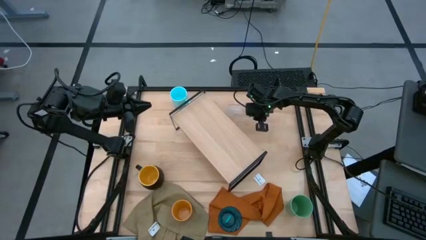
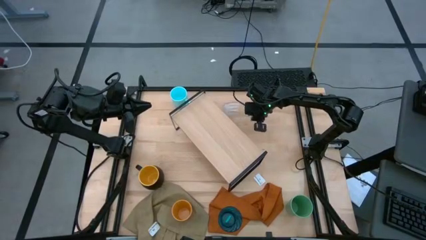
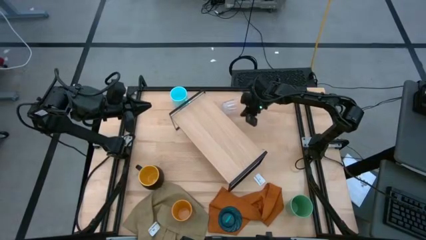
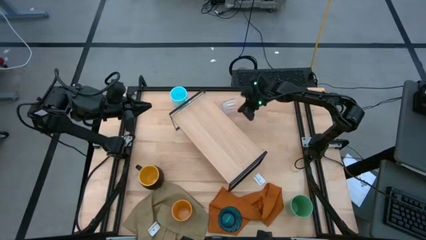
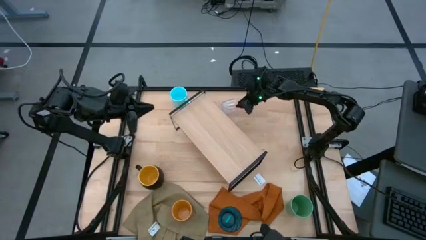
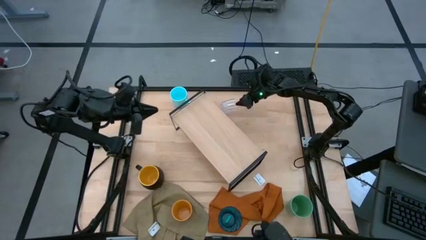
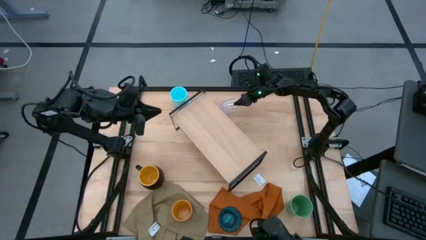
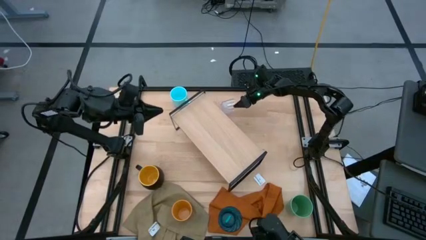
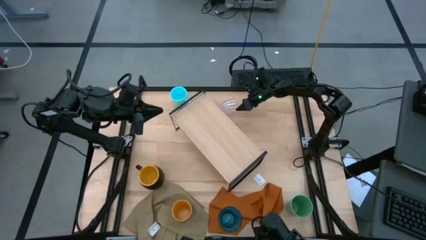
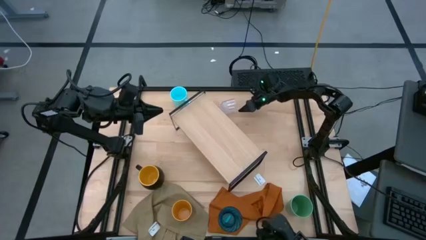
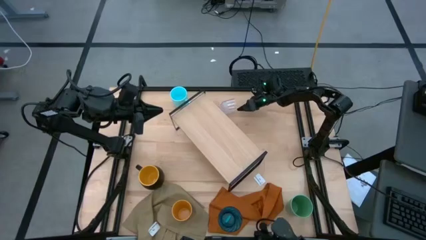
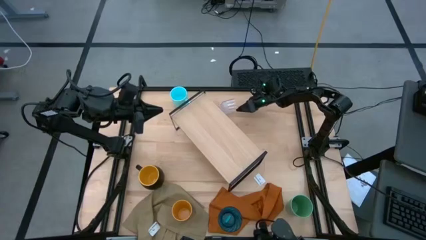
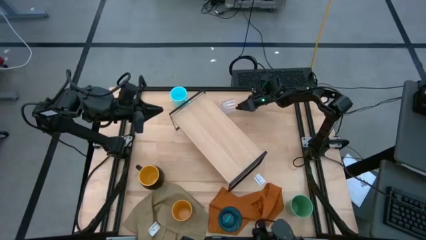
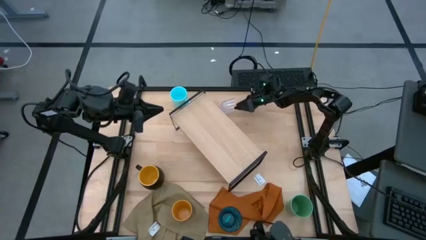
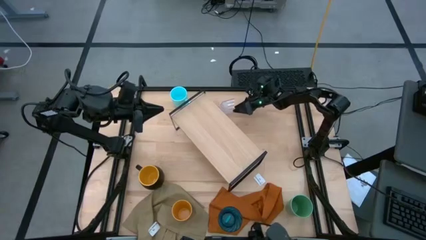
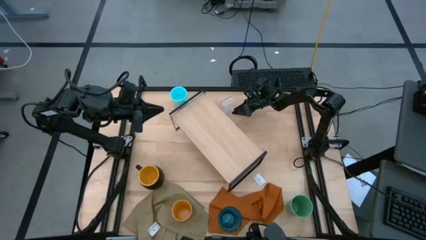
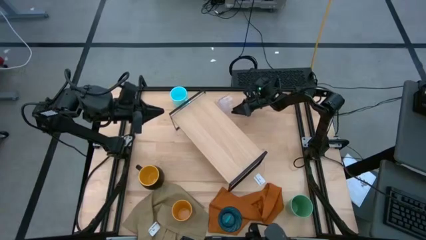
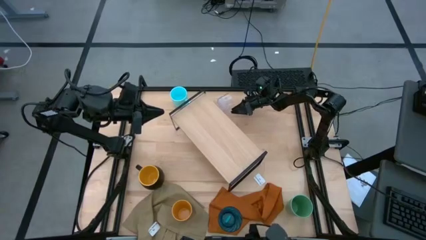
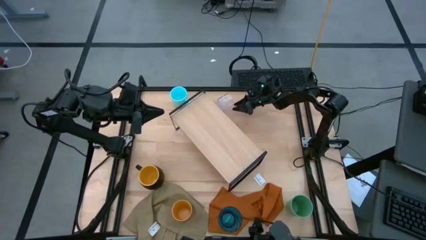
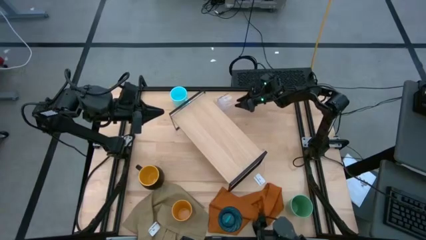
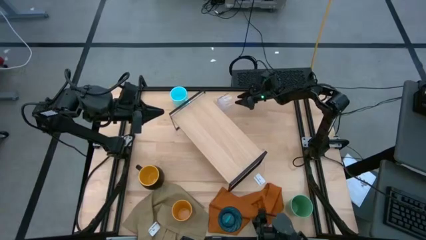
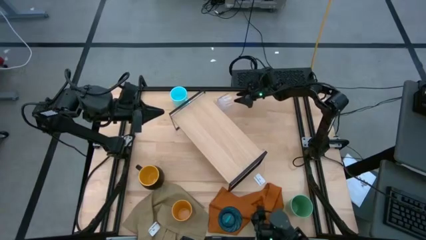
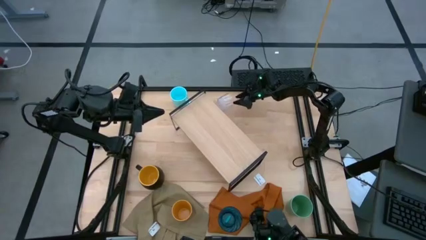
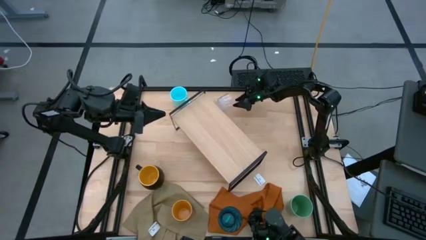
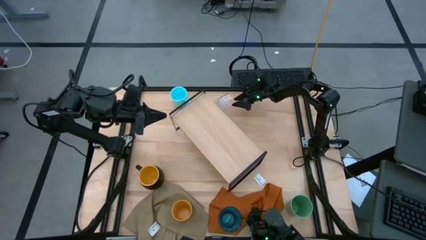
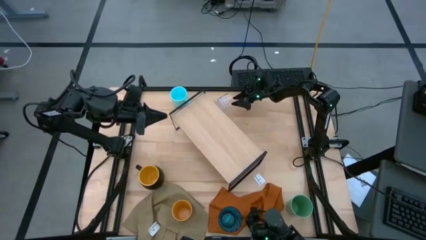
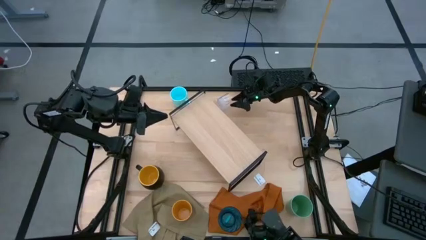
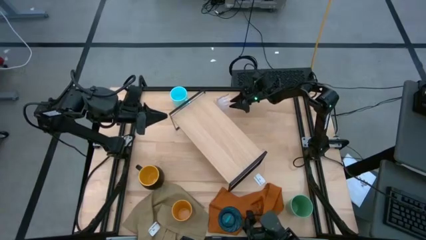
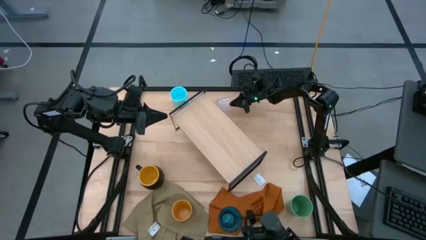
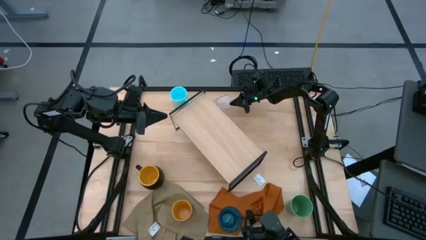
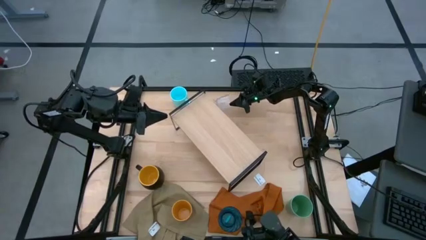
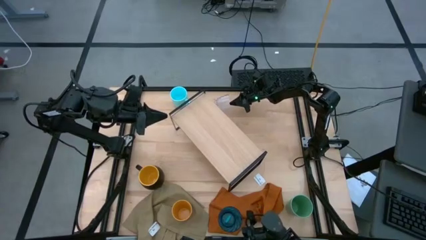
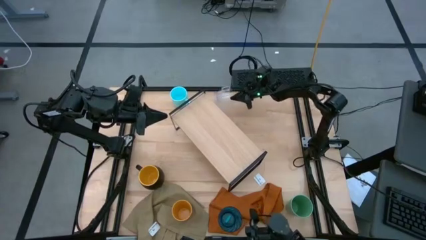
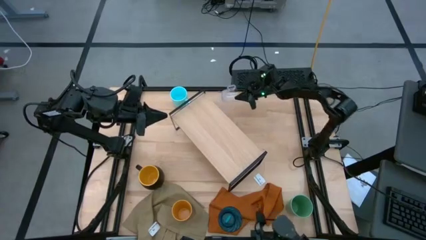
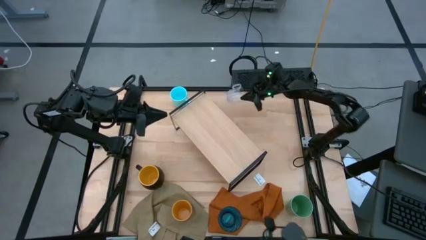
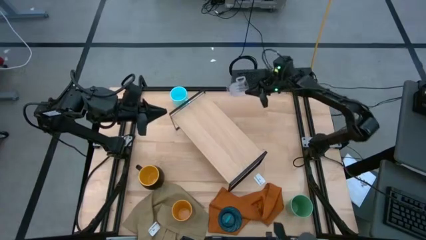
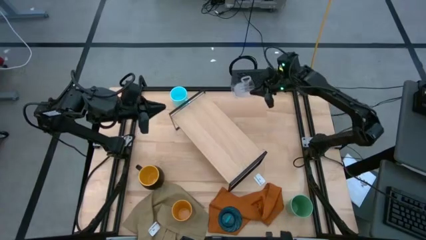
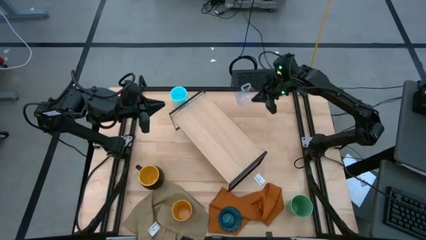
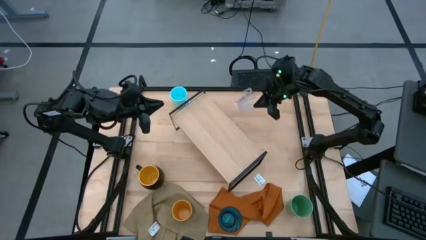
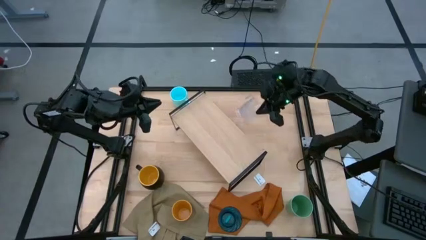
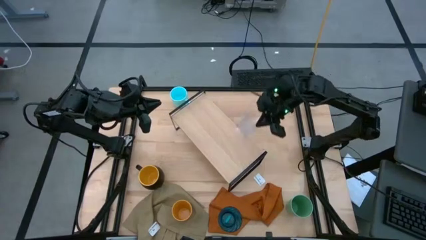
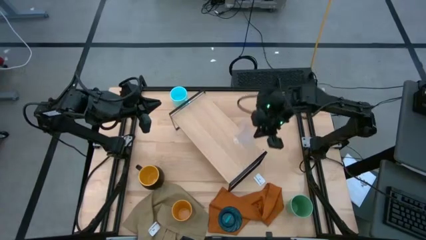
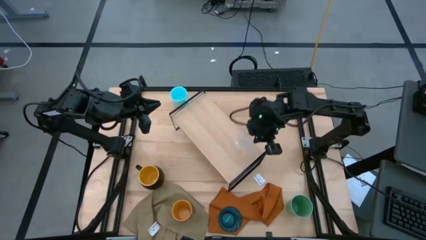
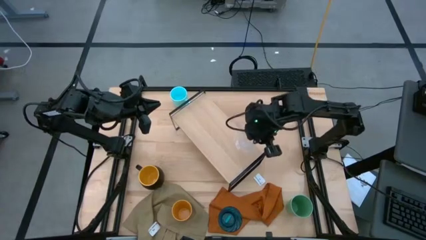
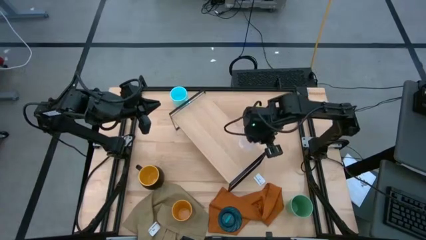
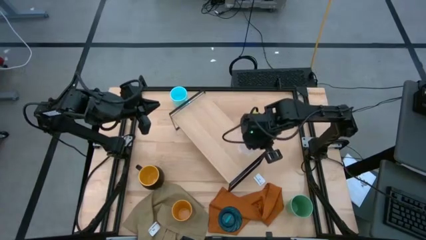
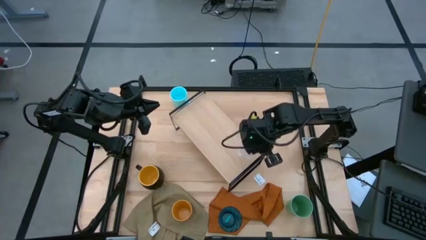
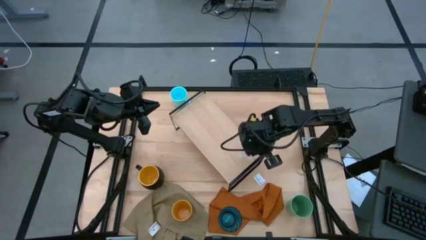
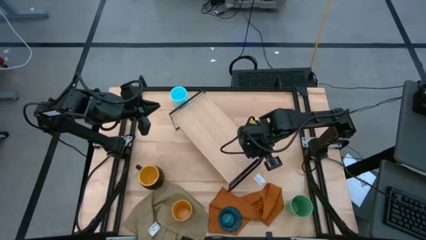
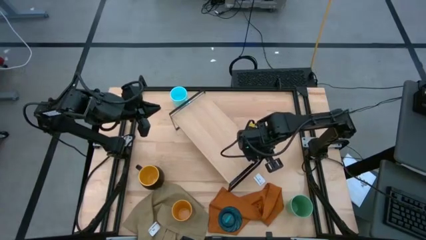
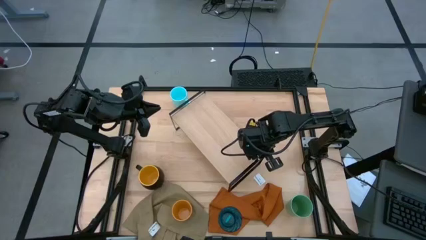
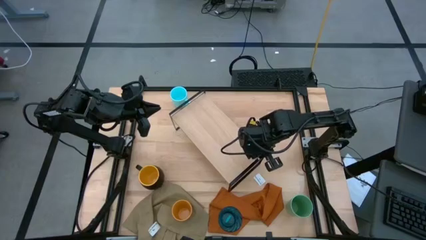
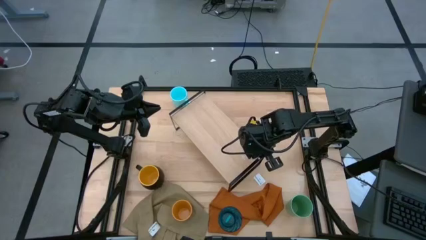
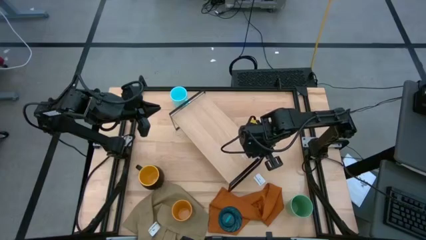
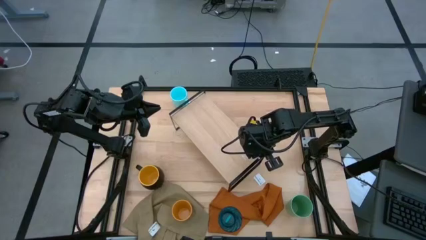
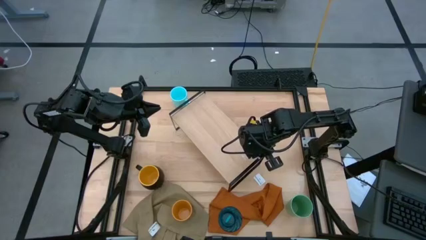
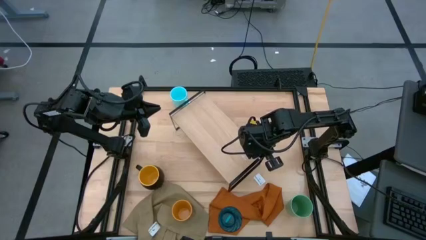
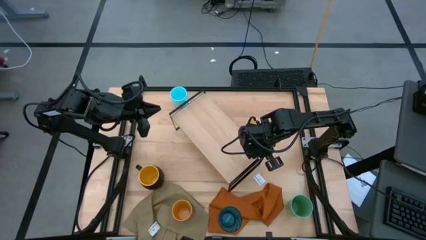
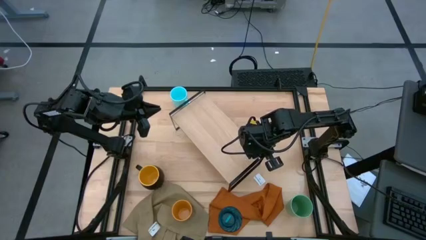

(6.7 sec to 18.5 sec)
Task: Stack small to large cups/mugs on shelf
Put the transparent mug on the shelf
